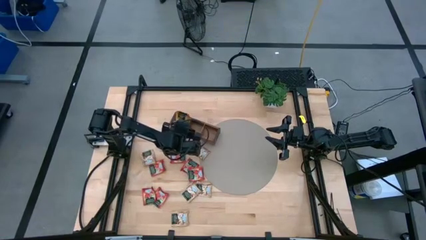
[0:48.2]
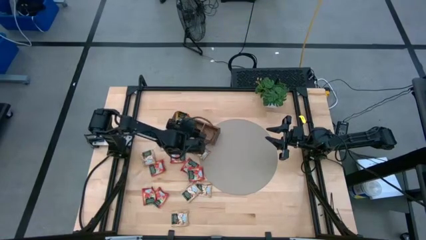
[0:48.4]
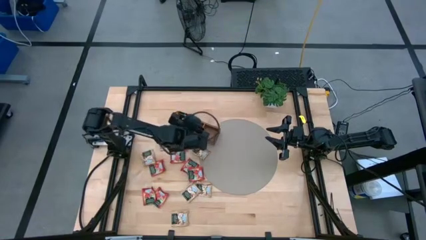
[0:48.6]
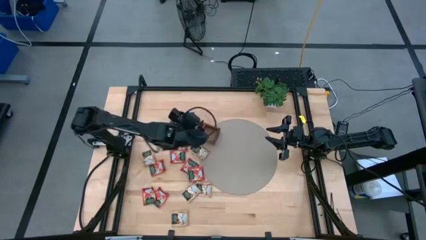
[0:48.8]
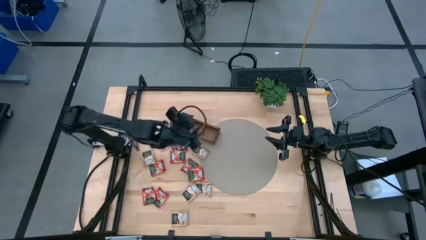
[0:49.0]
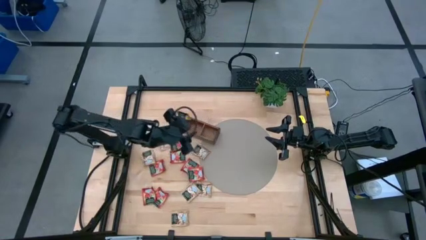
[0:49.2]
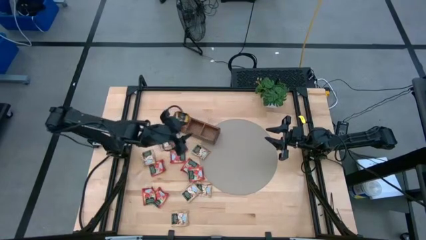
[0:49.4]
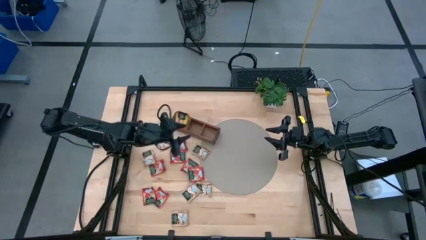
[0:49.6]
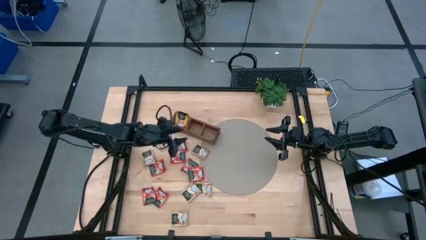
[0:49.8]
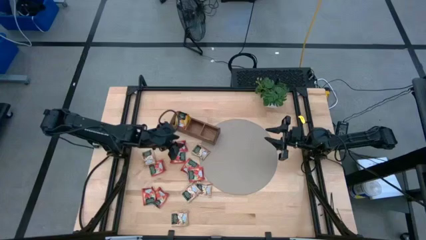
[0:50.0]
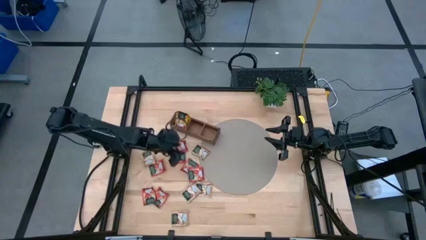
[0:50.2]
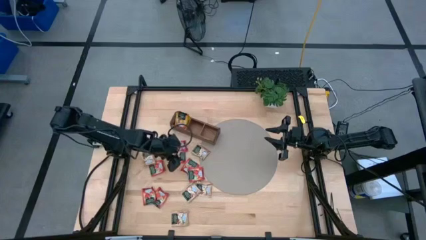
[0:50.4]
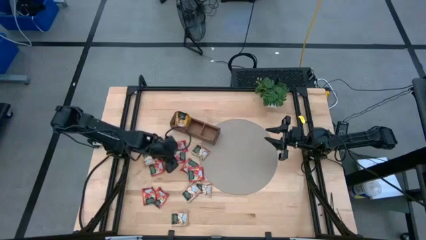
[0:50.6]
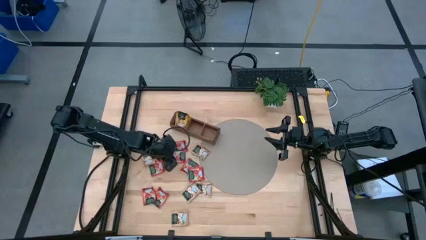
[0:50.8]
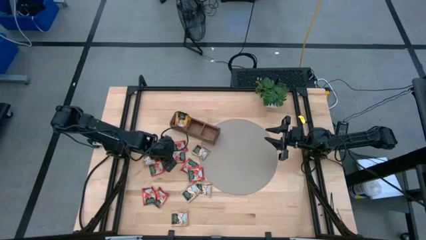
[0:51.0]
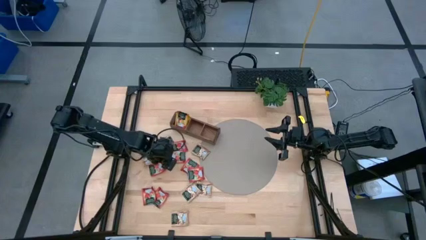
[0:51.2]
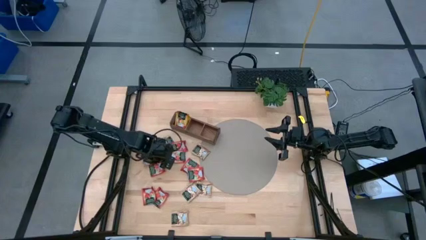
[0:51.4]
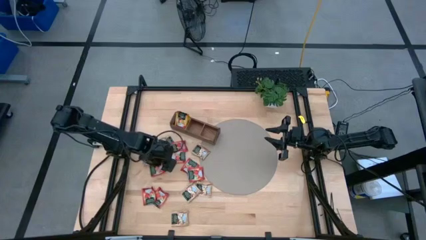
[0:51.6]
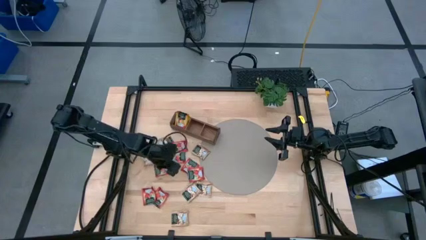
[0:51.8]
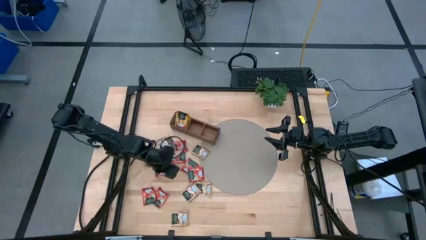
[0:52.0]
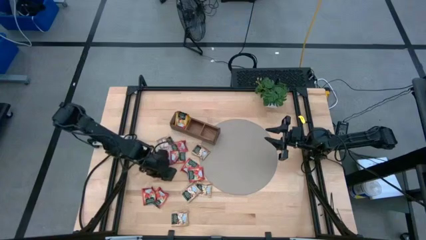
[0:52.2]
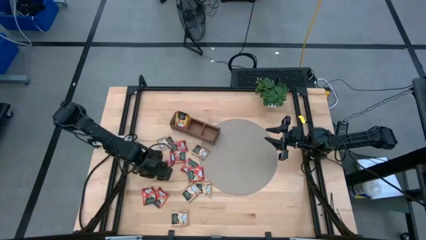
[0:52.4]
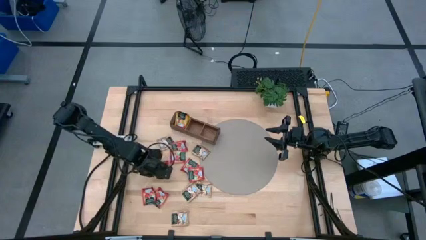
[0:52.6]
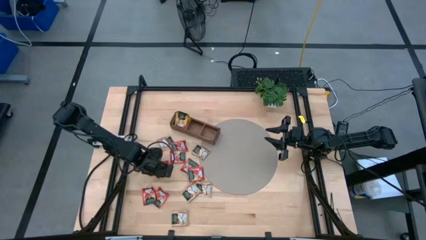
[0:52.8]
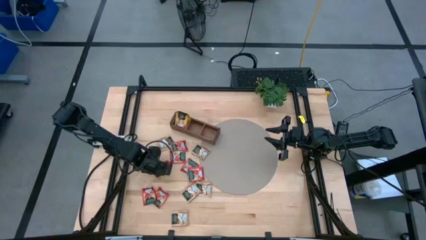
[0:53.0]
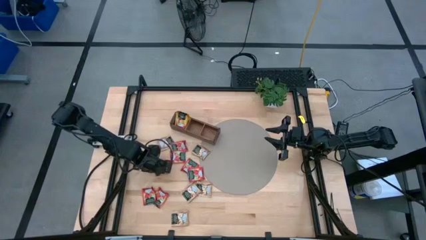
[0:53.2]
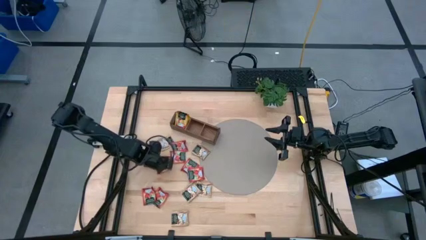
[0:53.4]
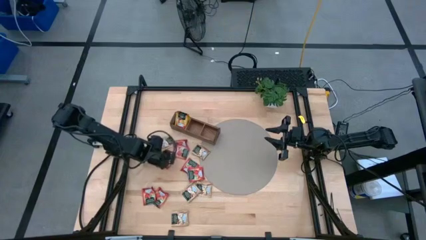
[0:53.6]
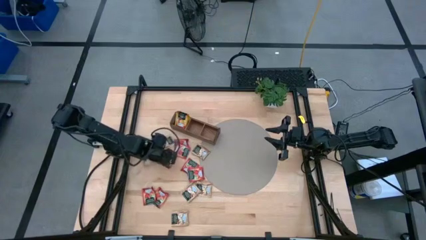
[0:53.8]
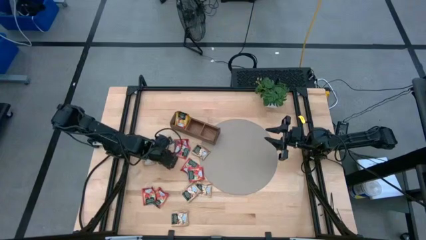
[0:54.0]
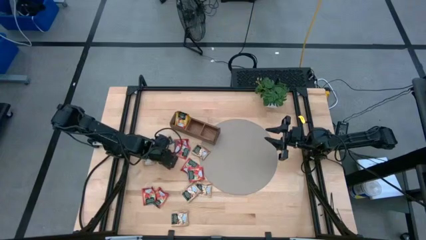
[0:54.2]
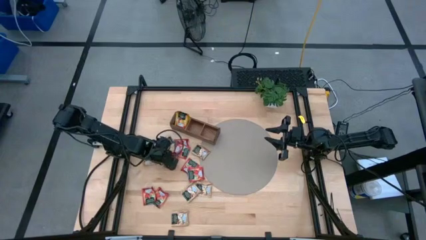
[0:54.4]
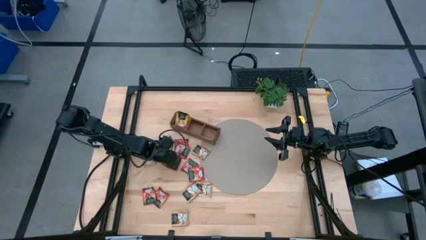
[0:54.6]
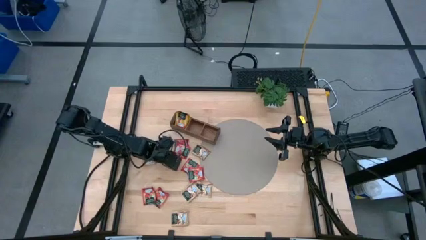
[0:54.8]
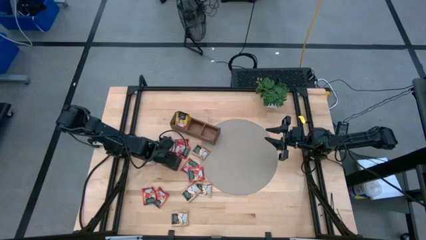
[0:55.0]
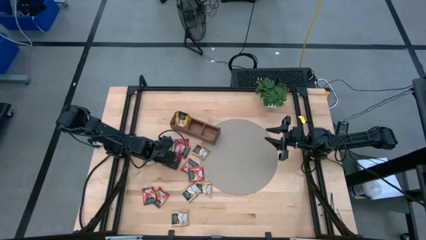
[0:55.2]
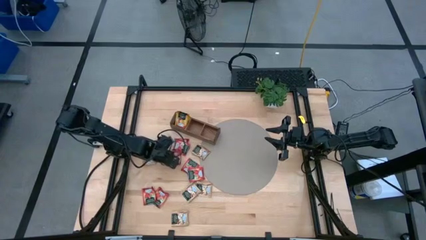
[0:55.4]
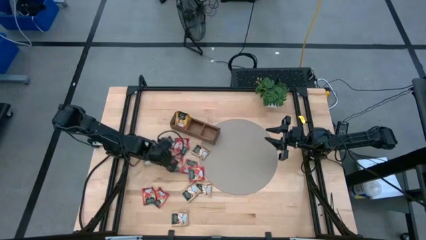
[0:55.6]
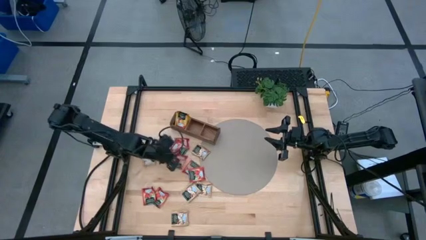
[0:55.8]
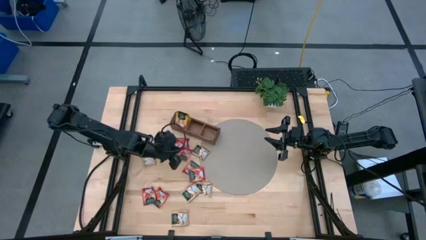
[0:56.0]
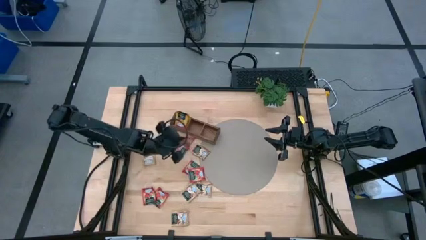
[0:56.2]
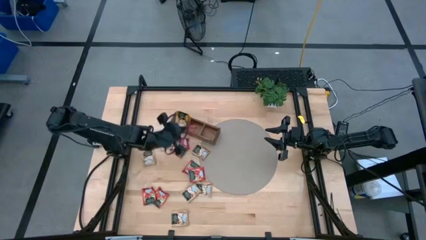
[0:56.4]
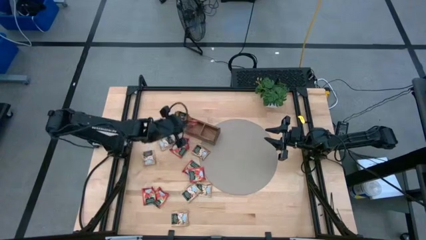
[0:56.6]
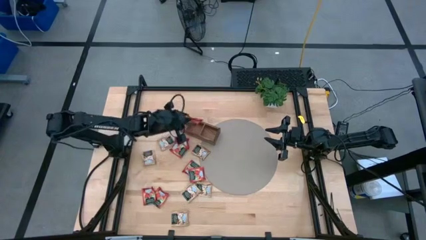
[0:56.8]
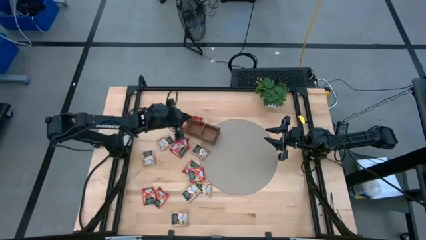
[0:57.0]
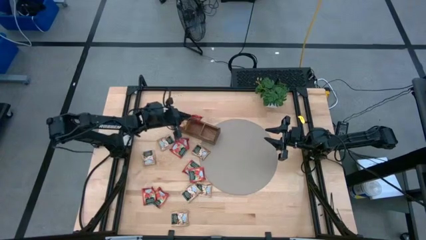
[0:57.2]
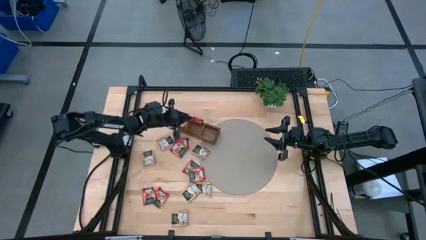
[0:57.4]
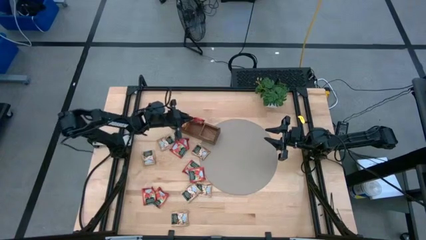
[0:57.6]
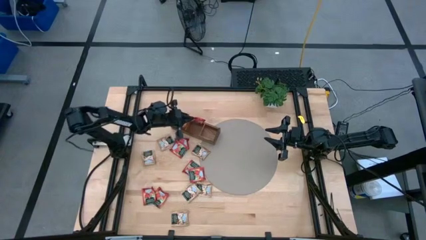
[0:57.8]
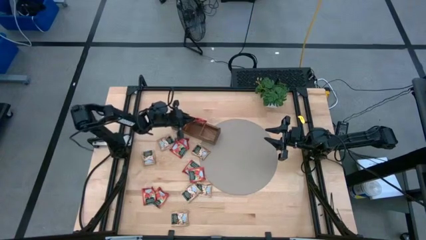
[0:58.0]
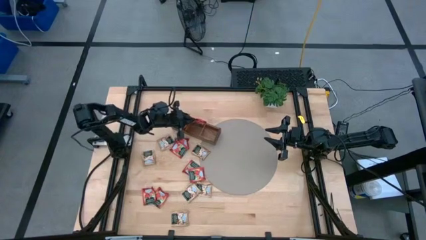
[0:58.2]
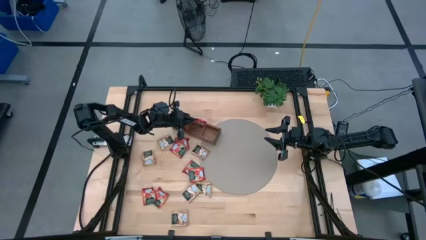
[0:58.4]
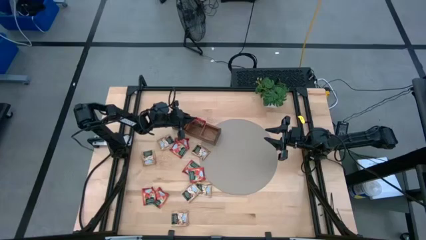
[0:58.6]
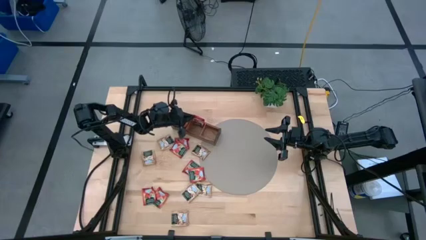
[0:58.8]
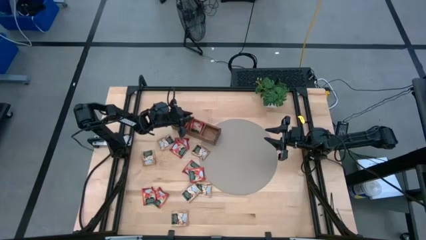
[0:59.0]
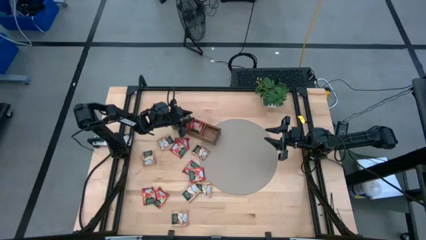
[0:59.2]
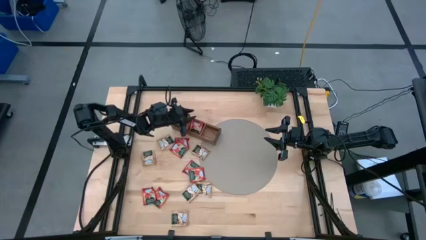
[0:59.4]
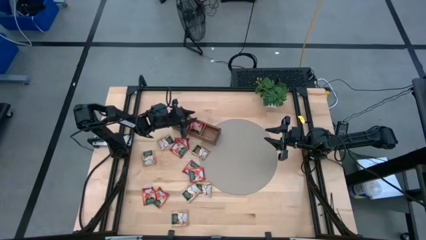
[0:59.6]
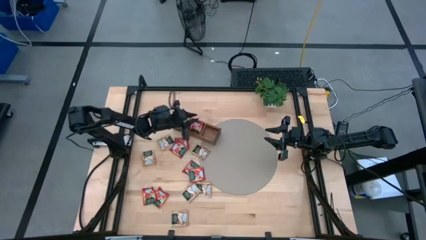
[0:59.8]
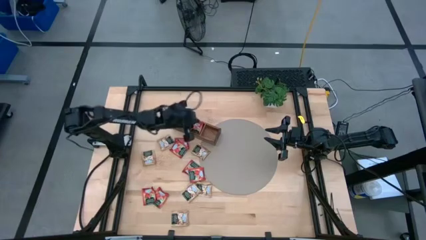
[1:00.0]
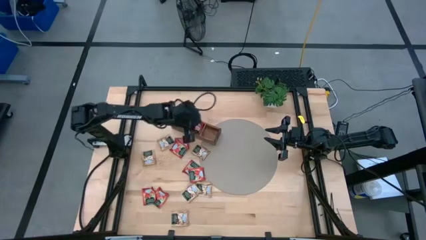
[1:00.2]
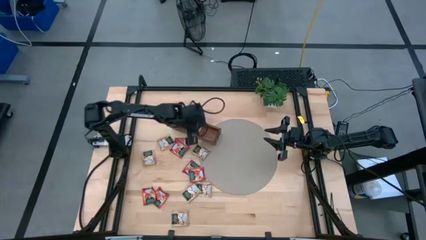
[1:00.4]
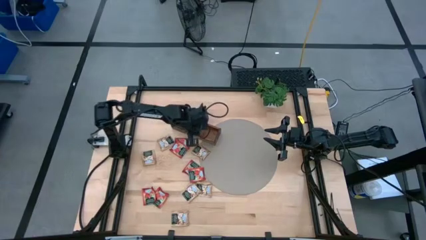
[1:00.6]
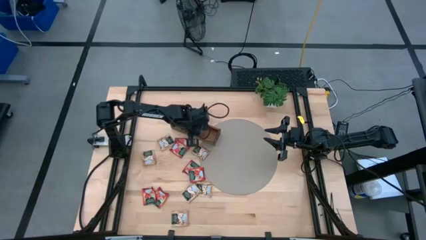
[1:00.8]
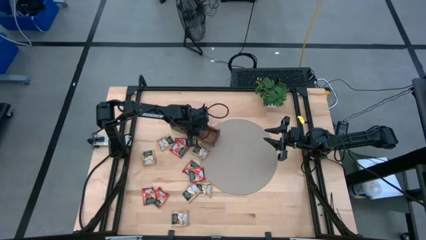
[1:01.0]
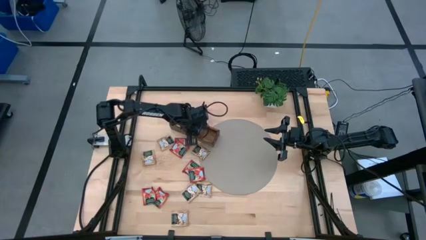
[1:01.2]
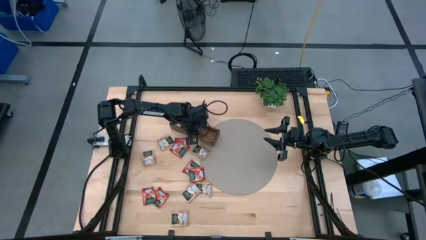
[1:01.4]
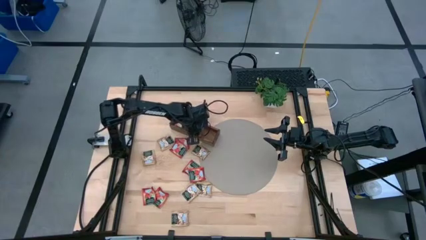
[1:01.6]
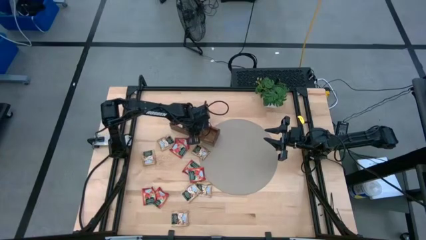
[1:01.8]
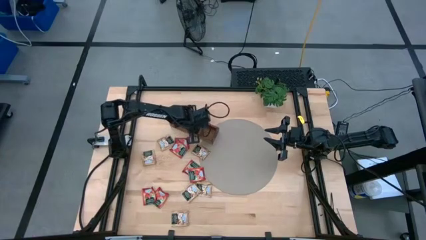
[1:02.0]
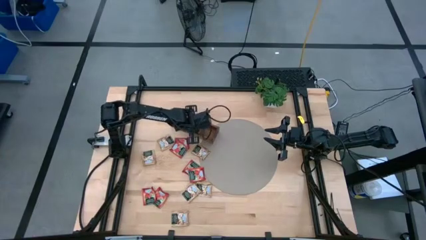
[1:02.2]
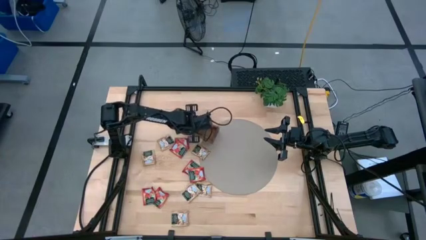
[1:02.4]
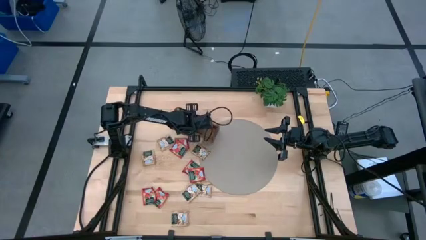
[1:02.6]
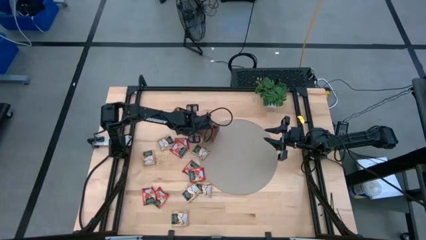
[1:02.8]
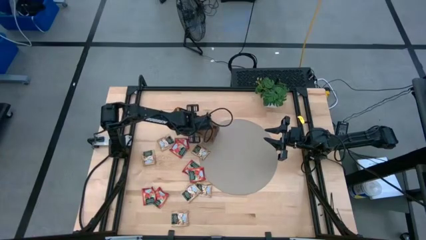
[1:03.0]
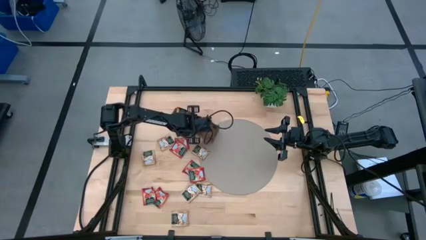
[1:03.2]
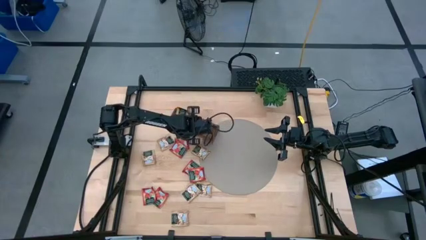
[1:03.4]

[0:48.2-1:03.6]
Task: Pick & Place Tea
Put the red tea bag into the middle section of the wooden organizer
